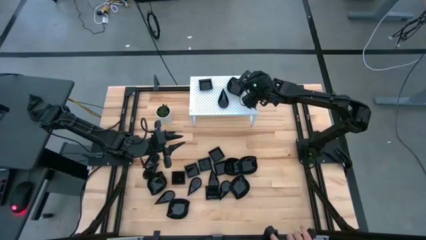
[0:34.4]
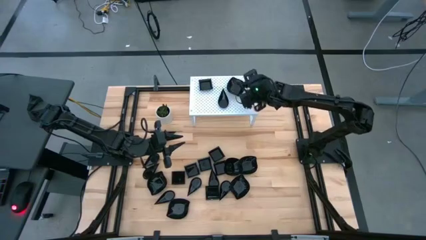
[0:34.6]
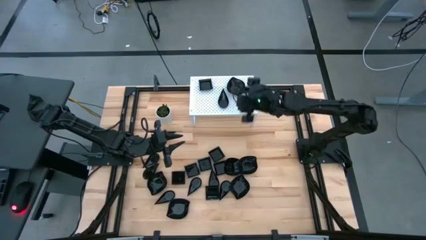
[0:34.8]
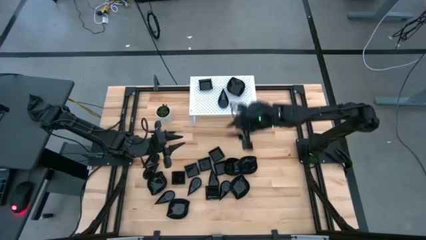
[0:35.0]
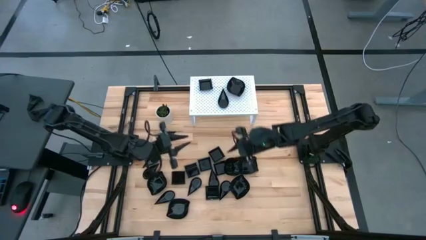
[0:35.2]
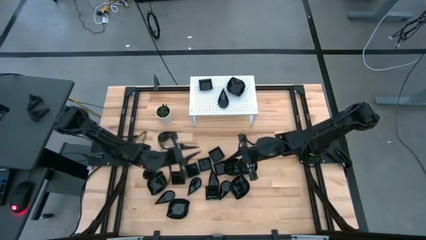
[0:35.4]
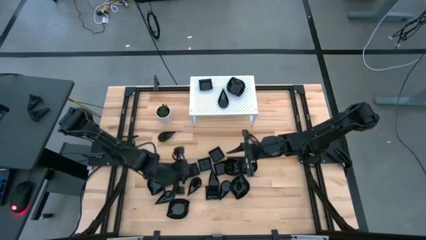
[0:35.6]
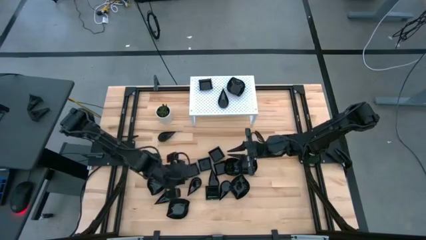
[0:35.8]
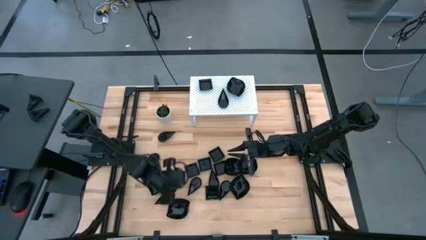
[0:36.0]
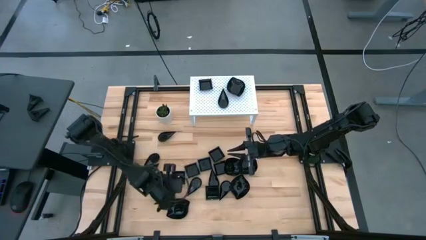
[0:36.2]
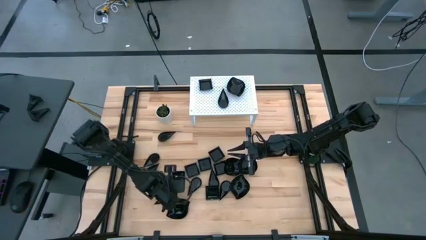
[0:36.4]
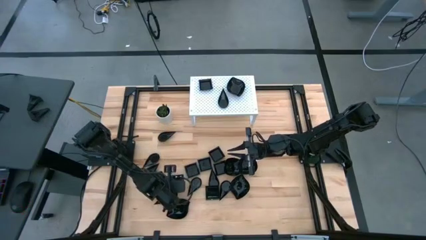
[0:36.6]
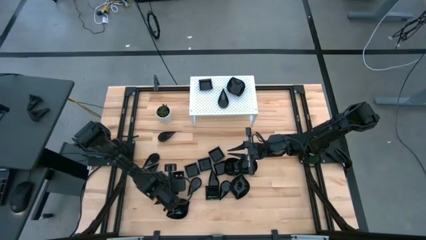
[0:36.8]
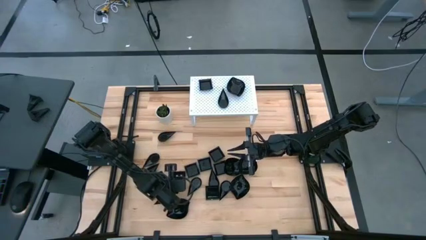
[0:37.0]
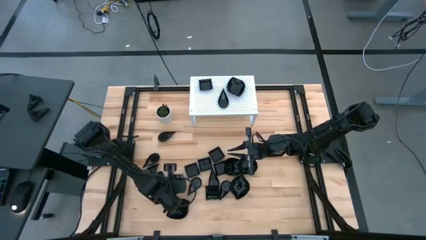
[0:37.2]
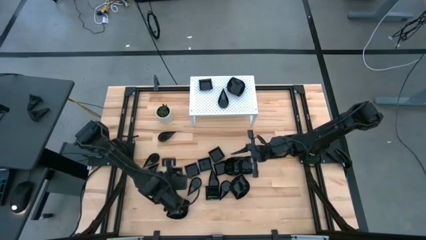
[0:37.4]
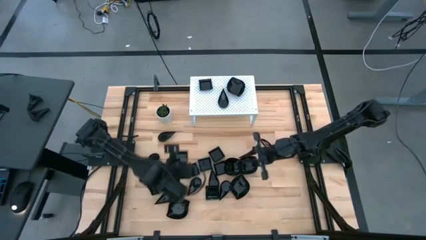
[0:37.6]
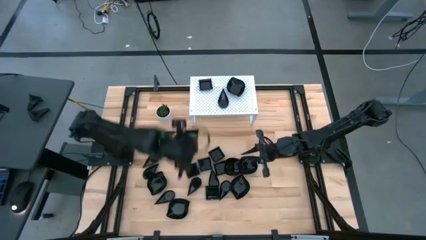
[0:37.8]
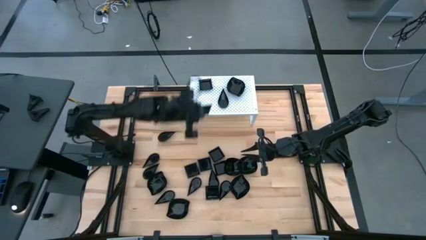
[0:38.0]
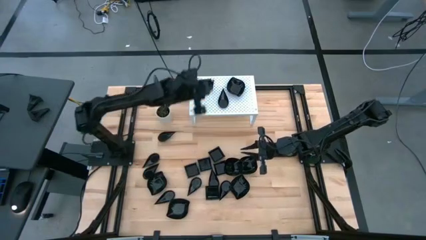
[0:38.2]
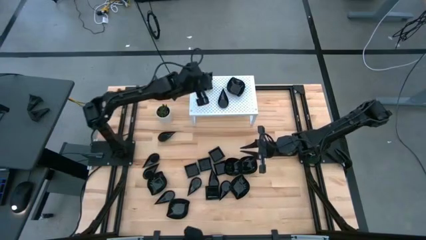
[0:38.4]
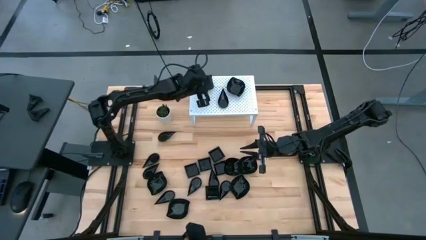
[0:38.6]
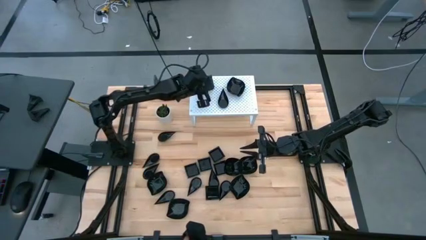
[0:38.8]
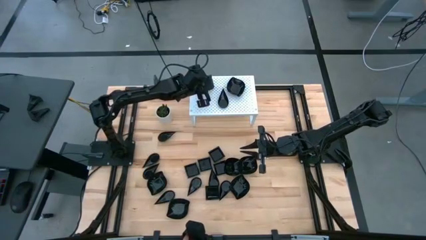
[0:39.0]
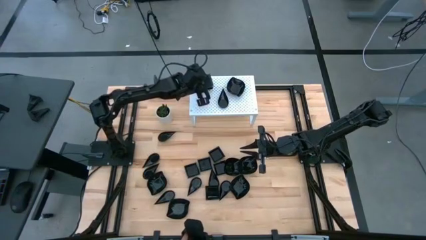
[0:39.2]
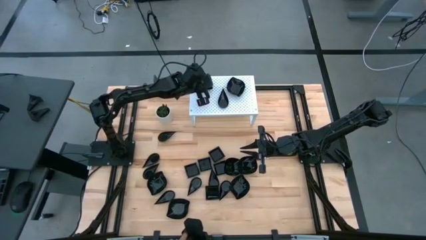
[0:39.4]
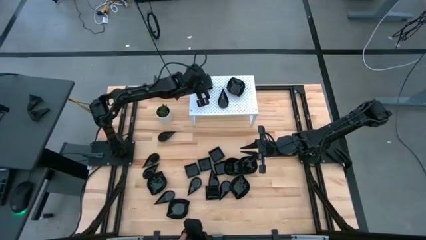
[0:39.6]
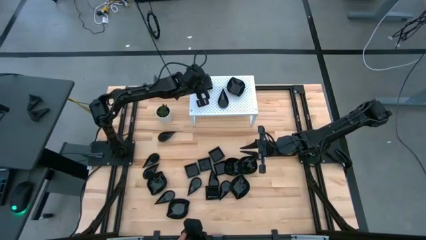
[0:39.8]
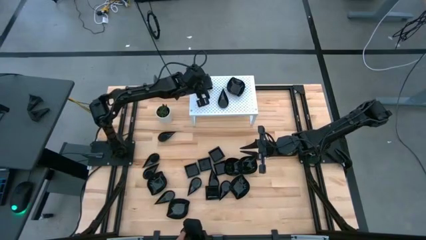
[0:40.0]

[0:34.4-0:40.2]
Task: Pick & Place Mini shaped plates
Stack the black plate on top of the black plate on the shelf

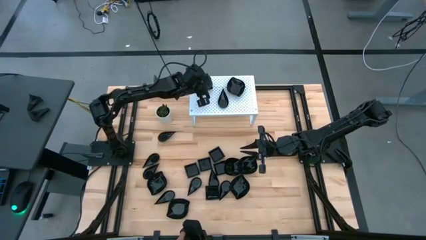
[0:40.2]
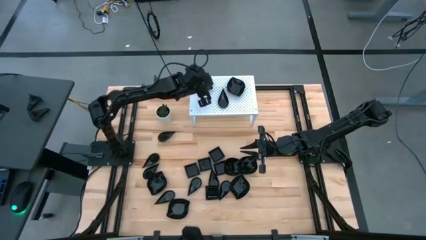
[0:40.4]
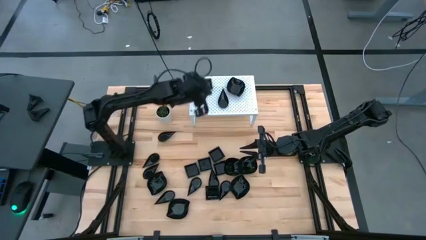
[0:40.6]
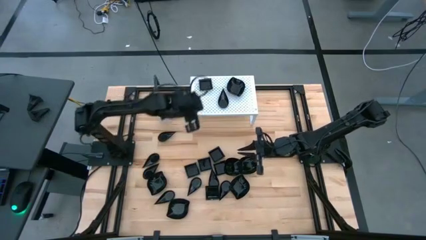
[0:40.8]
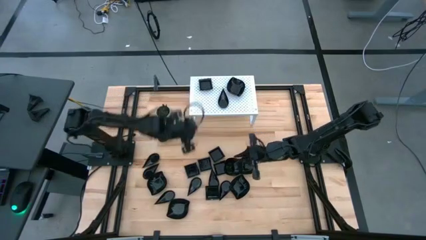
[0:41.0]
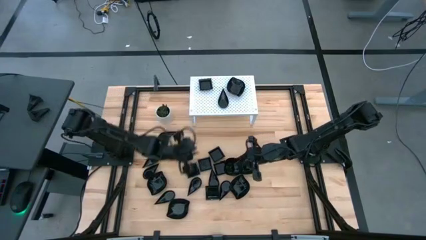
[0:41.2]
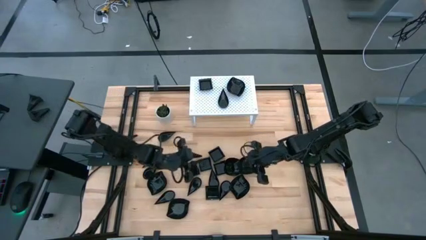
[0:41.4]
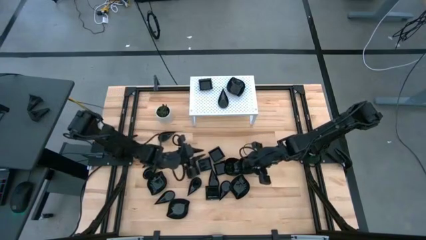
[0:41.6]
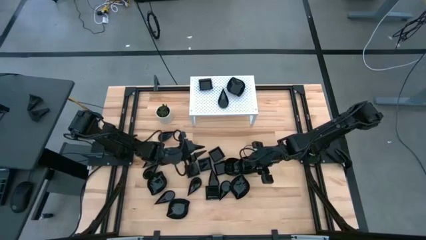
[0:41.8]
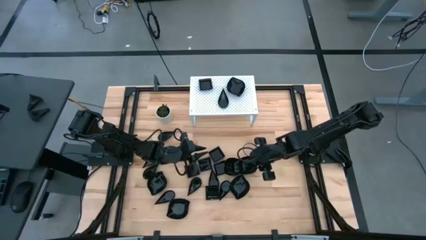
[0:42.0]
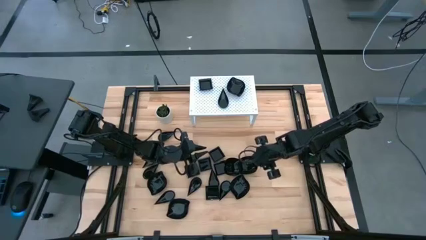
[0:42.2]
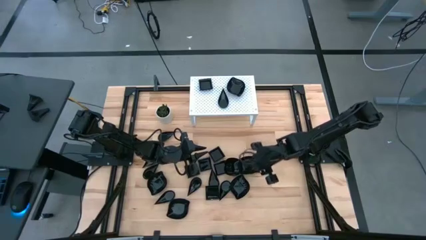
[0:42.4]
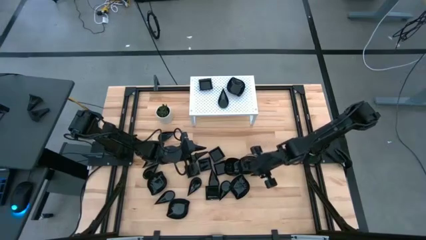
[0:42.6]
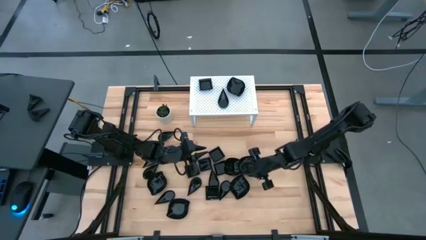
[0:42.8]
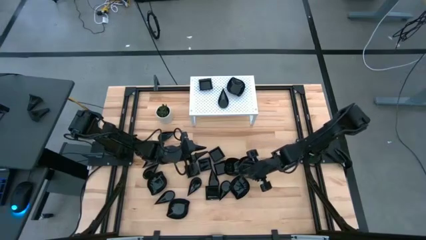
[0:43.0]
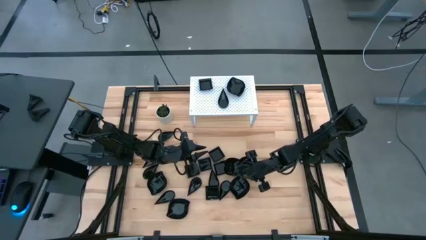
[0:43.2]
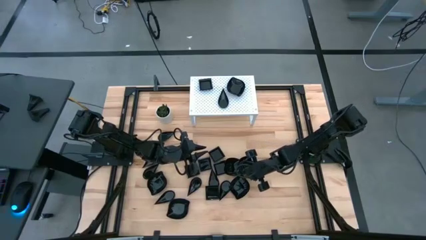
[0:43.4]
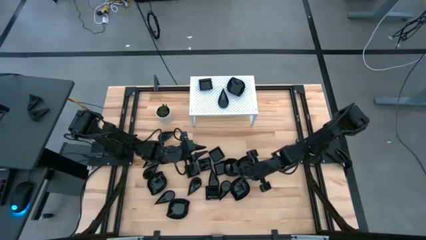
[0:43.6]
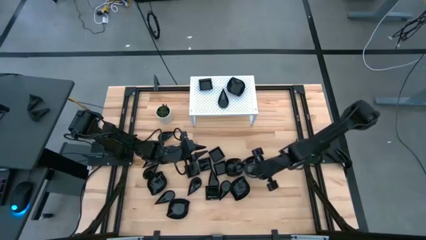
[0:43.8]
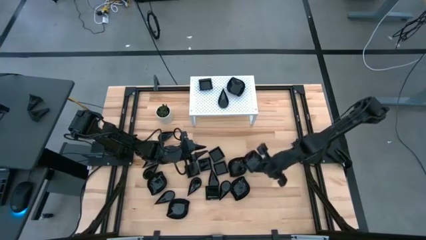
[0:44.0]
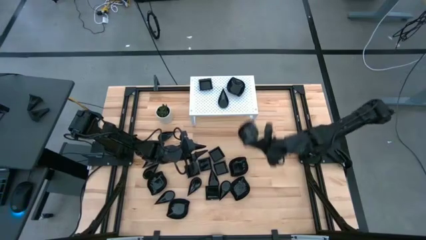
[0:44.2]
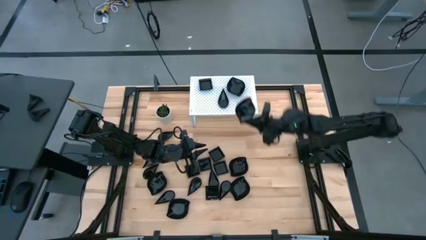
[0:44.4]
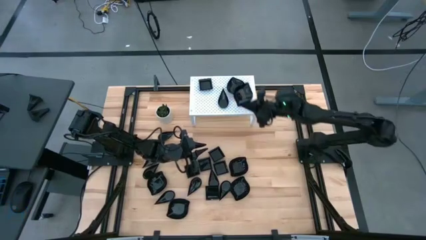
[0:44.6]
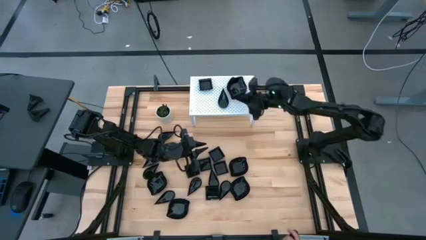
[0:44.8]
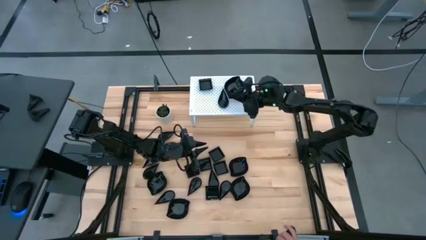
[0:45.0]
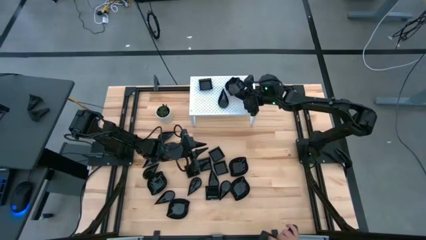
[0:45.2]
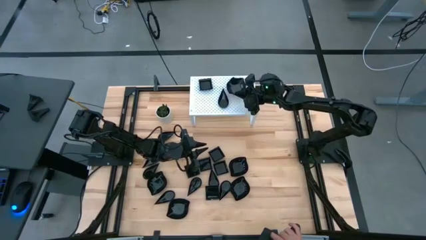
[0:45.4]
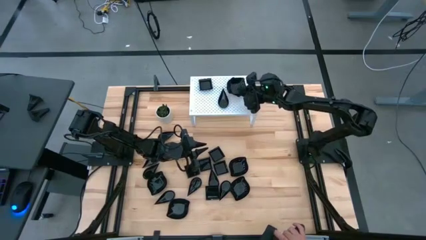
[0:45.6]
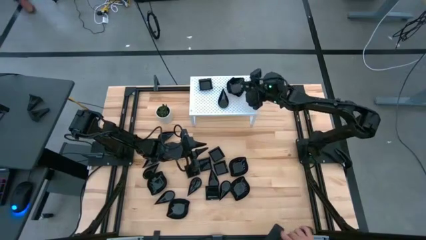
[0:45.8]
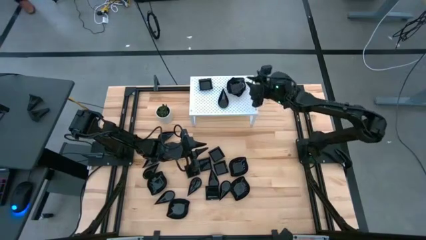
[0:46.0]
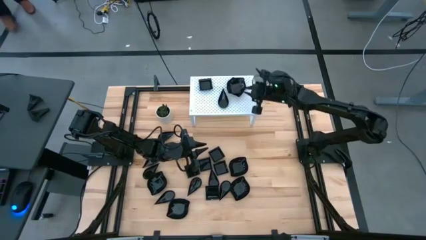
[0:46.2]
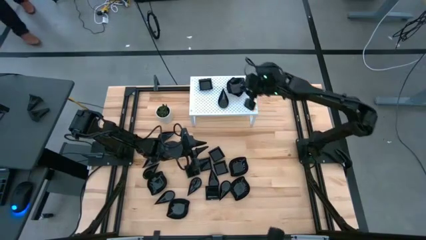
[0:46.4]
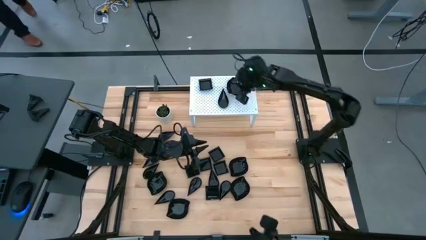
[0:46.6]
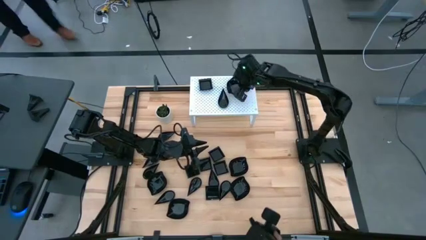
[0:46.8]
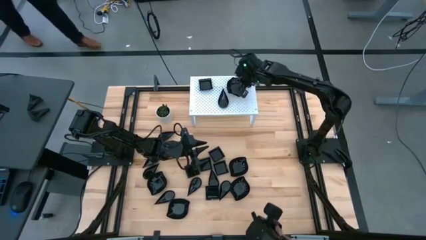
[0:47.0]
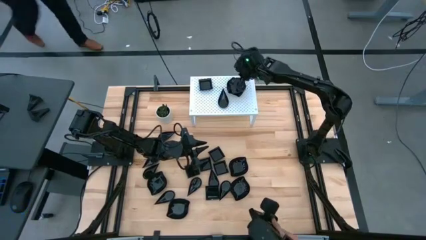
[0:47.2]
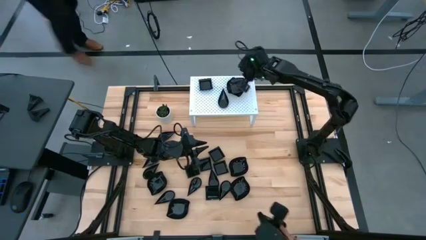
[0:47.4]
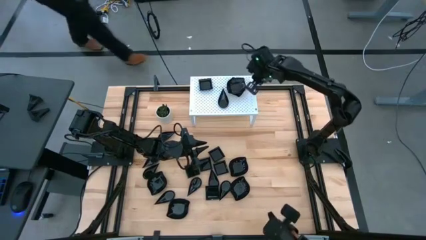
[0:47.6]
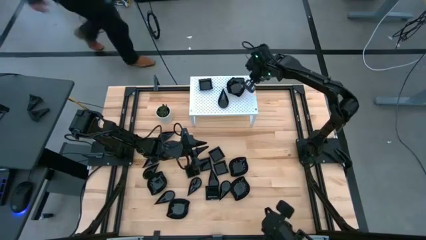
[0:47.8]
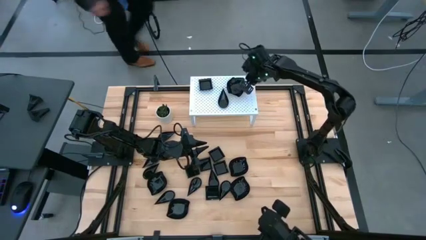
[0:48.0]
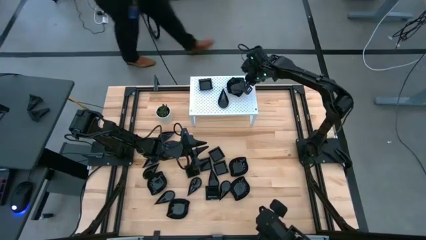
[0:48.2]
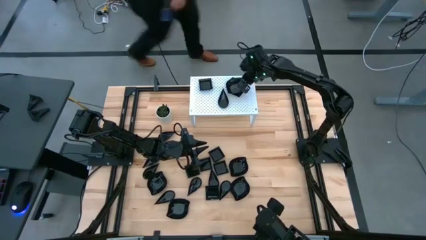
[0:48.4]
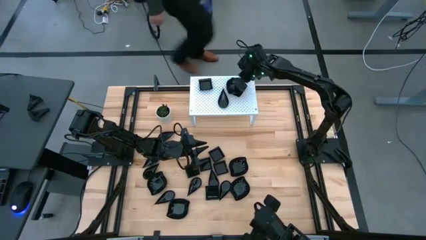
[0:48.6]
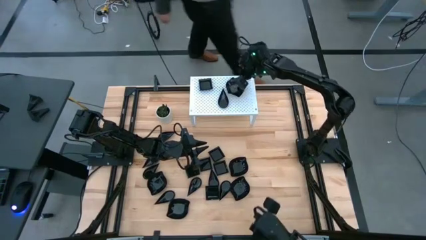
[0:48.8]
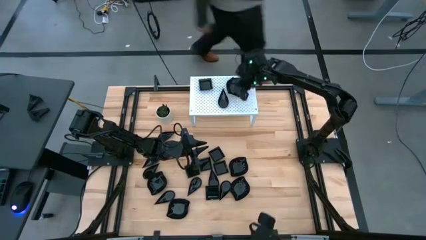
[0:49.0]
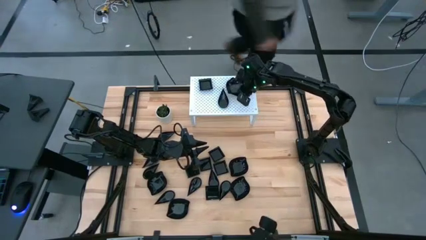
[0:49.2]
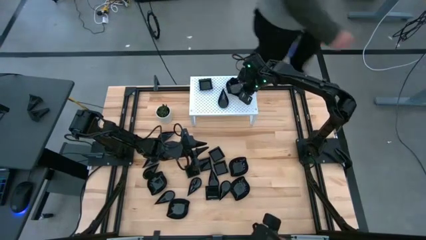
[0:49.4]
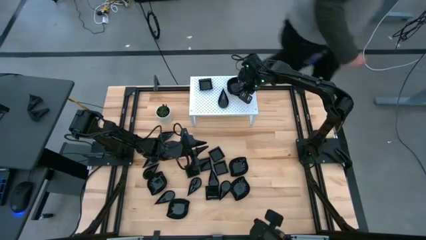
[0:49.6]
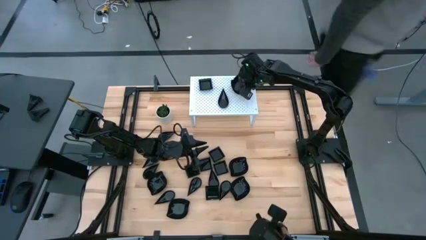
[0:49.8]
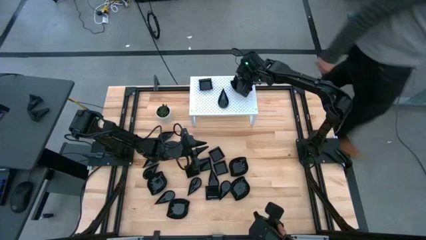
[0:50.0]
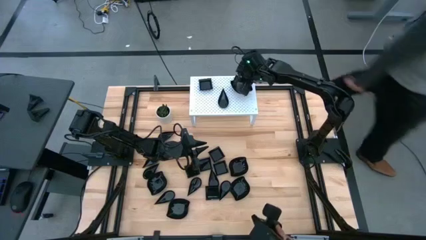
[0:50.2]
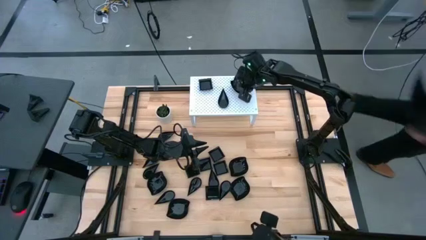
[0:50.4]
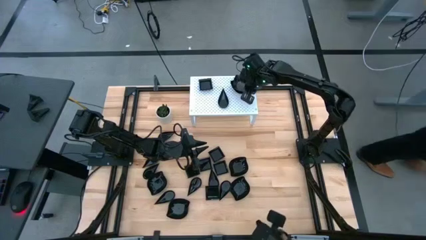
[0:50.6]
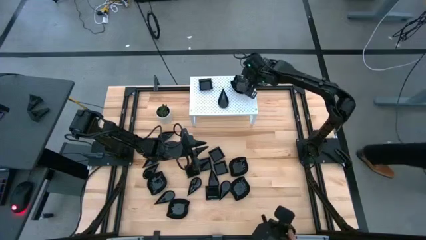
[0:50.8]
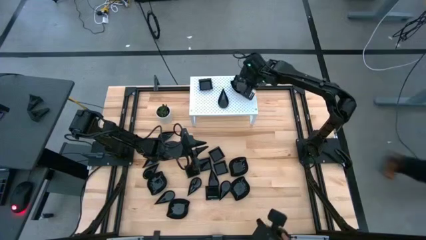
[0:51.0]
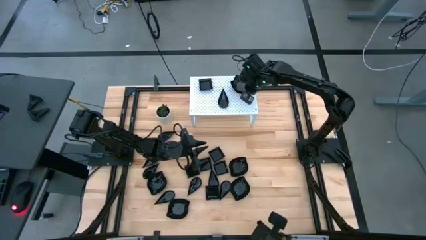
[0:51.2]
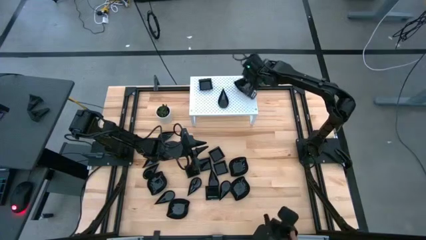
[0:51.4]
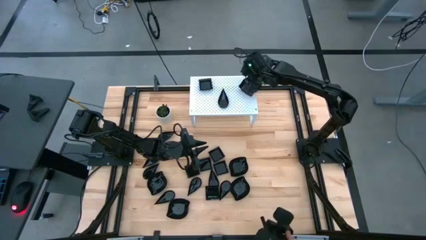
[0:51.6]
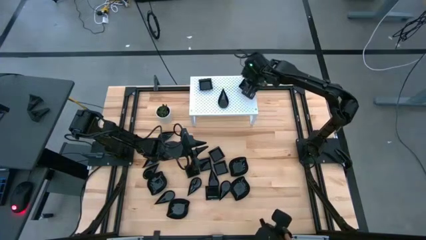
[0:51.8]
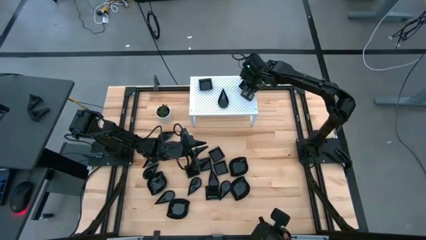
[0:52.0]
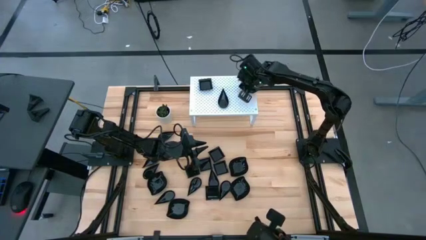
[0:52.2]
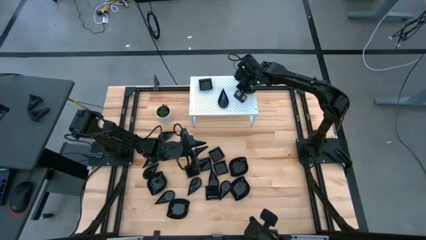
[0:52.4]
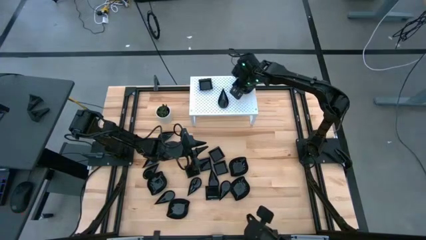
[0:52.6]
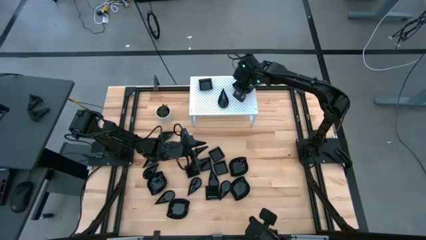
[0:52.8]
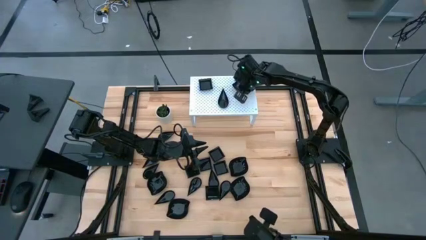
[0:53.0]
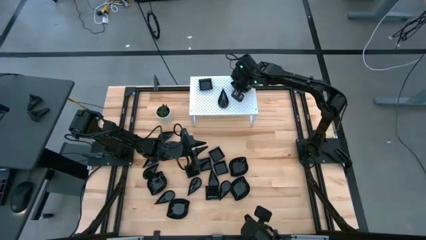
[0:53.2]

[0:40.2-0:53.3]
Stack the black plate on top of the black plate on the shelf
